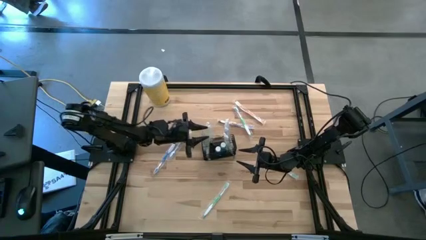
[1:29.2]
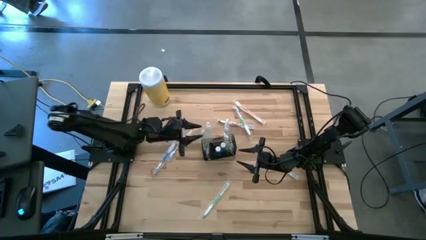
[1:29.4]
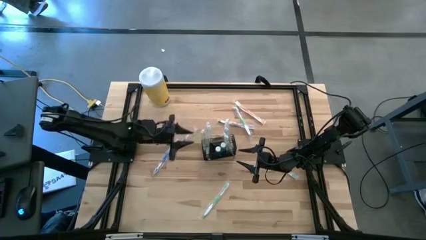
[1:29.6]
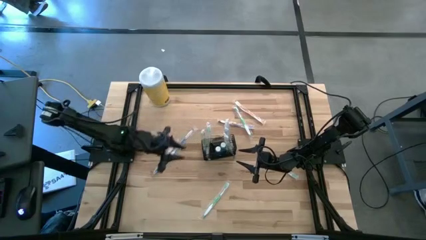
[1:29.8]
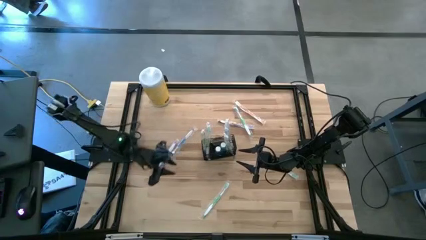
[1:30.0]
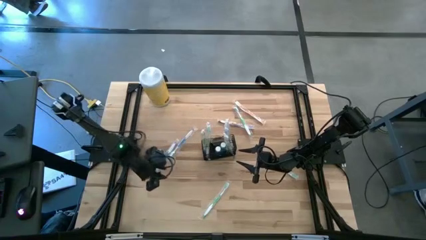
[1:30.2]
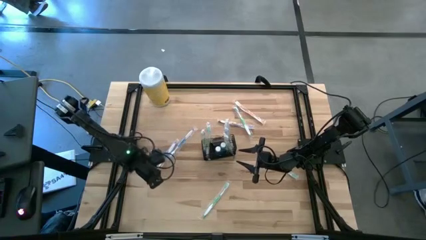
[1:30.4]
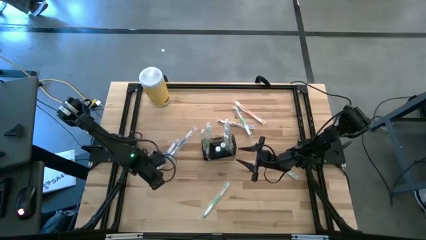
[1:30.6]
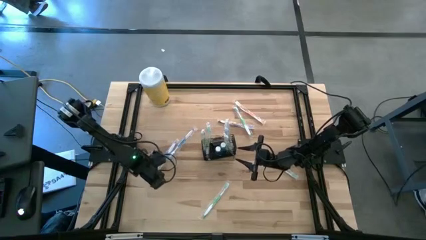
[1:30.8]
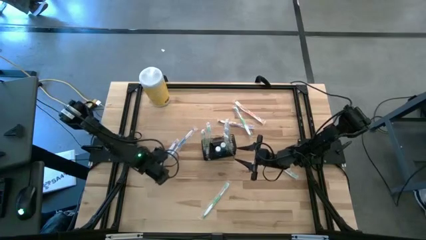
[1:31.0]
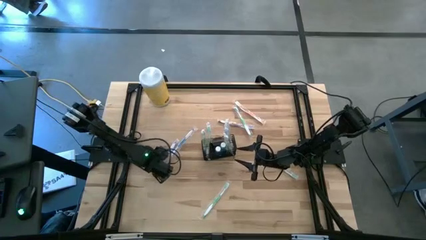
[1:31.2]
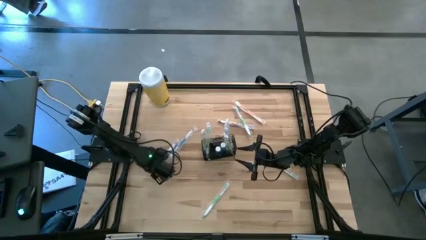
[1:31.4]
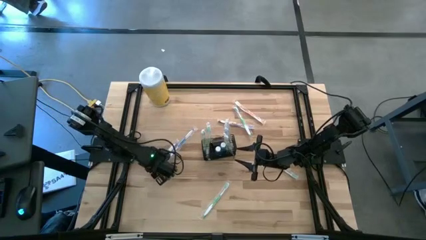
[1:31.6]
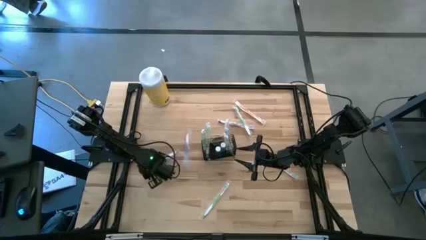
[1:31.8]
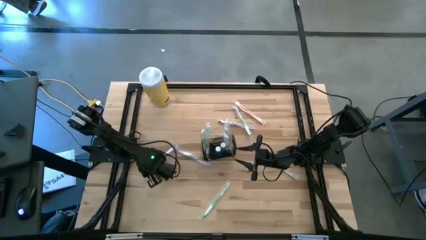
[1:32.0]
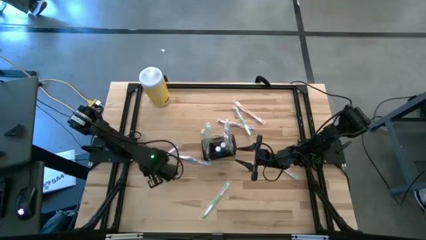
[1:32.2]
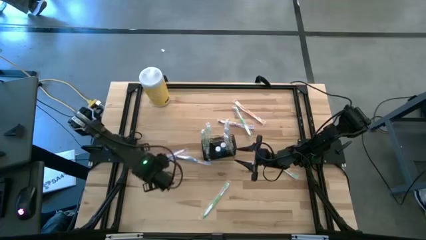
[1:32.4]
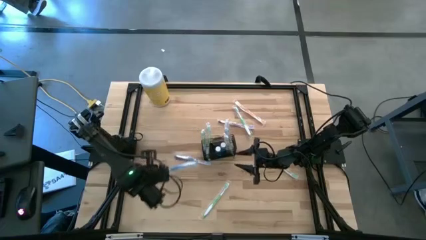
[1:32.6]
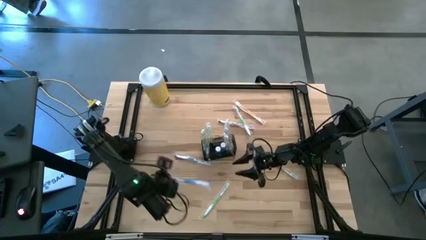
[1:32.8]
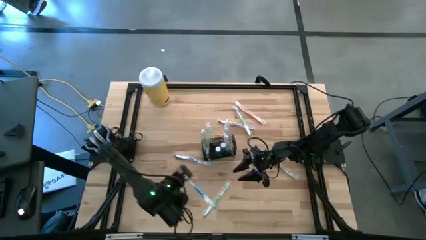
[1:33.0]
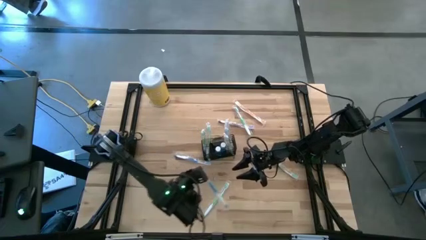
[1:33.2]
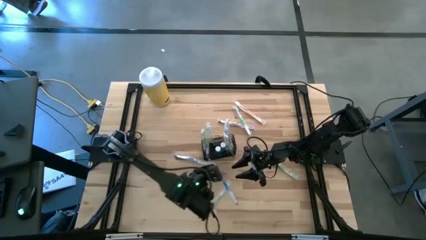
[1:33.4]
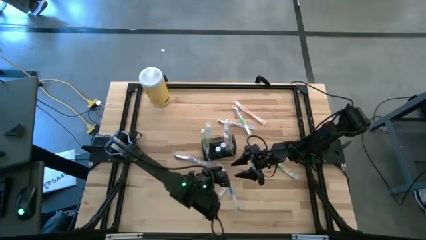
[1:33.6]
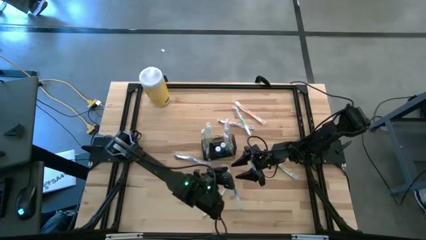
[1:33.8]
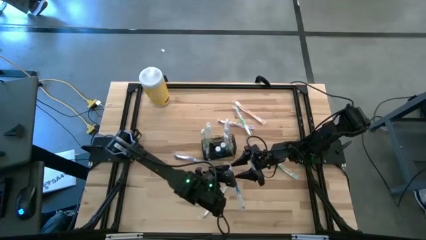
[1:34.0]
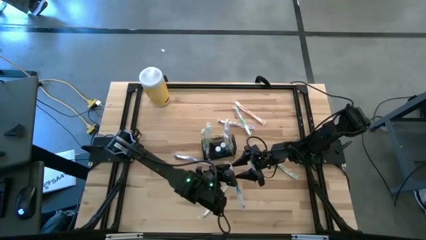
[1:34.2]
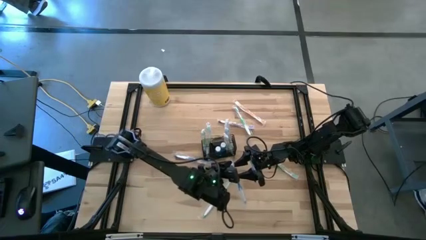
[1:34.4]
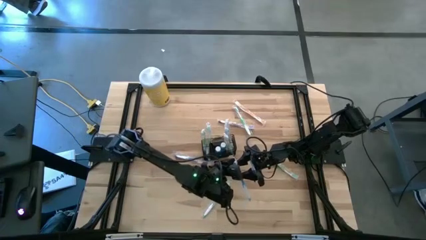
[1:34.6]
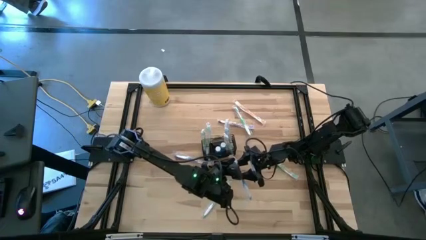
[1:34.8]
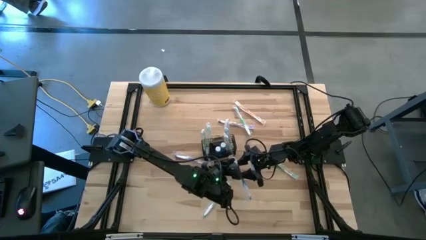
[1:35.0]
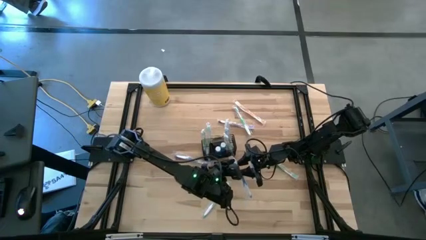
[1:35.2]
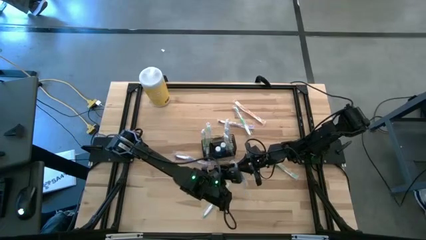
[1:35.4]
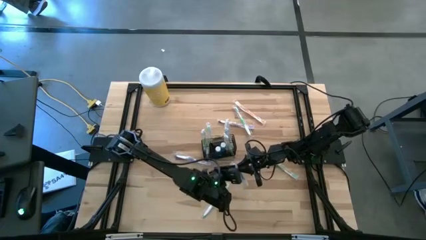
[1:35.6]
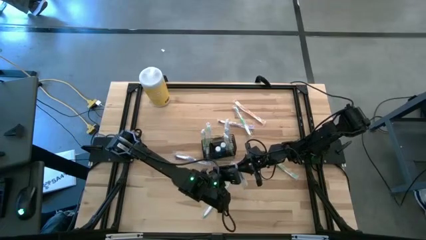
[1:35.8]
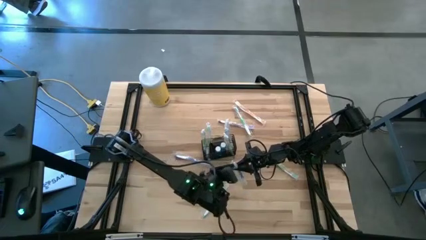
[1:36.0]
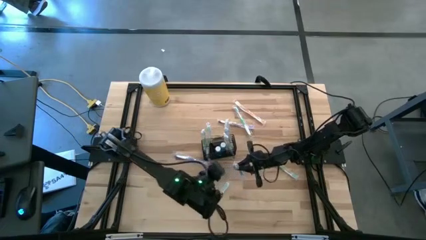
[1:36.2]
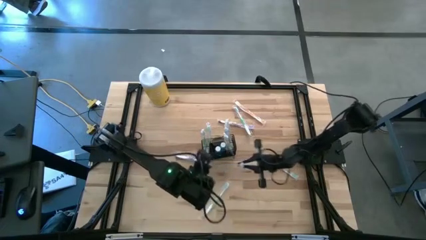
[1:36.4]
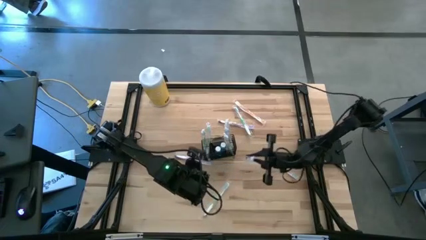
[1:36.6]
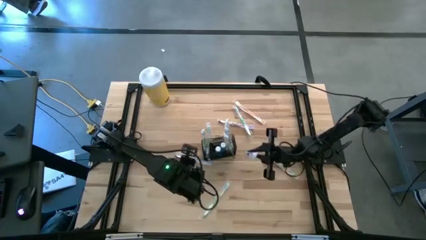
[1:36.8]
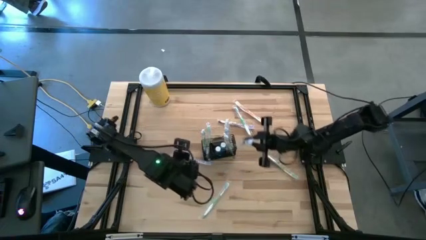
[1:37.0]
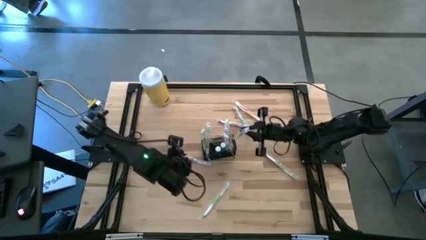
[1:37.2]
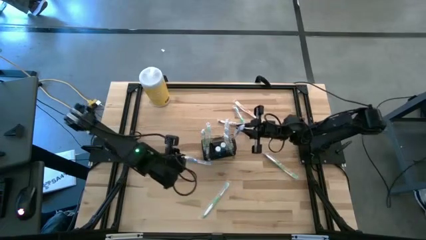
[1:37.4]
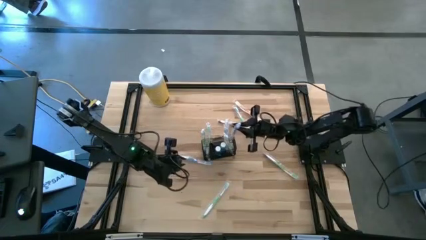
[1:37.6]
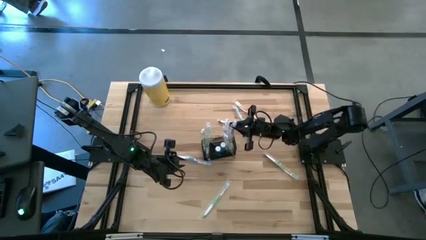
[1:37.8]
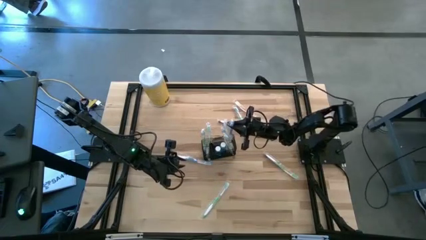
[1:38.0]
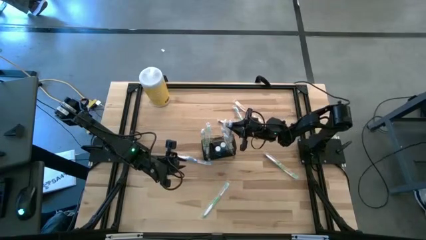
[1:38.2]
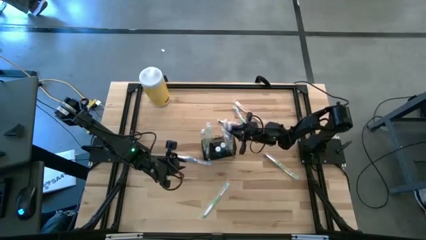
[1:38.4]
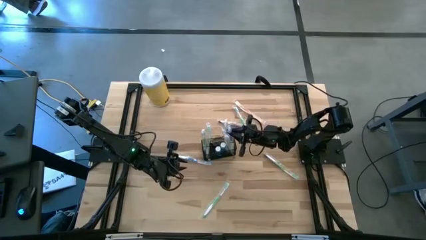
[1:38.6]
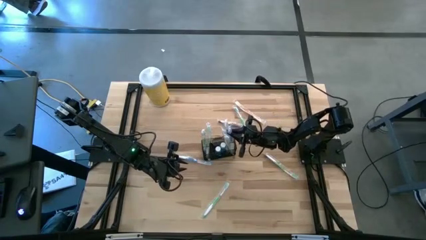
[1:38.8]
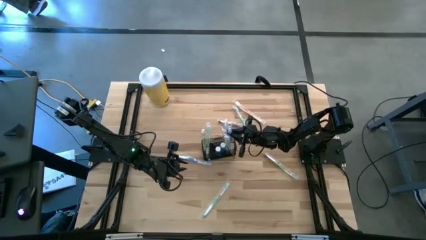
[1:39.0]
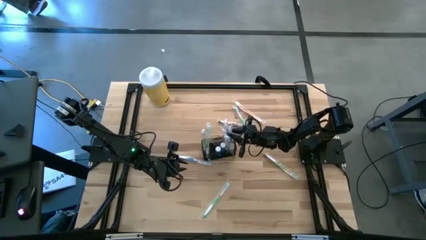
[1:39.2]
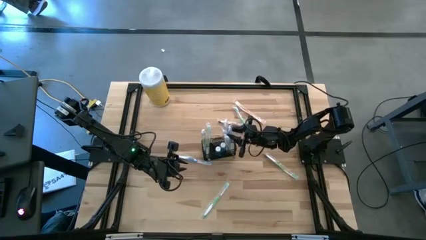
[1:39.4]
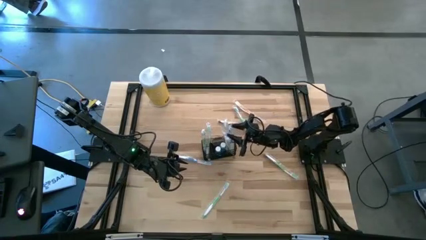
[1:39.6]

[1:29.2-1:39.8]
Task: Pick & Place toothbrushing station
Put the blue toothbrush into the wire organizer

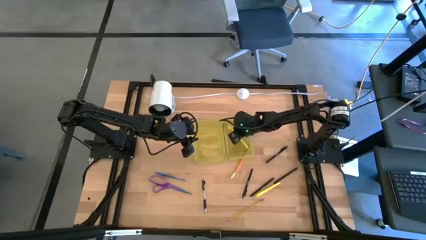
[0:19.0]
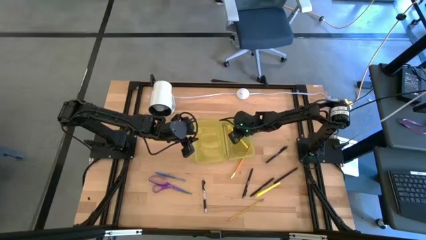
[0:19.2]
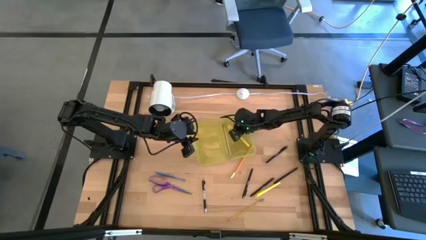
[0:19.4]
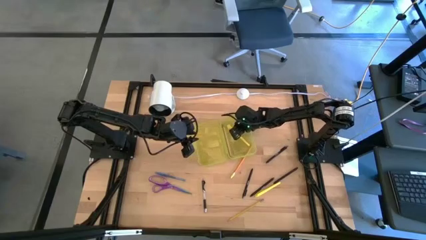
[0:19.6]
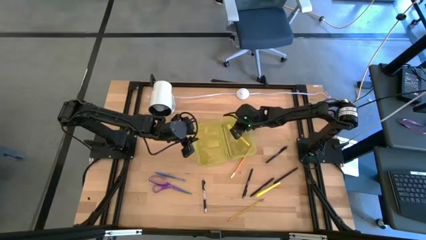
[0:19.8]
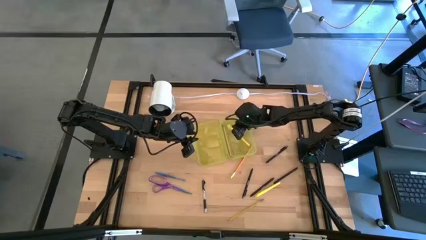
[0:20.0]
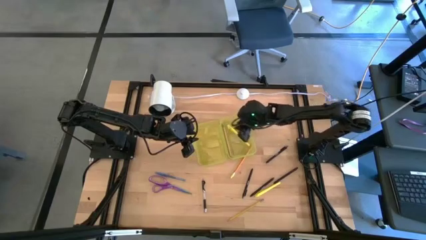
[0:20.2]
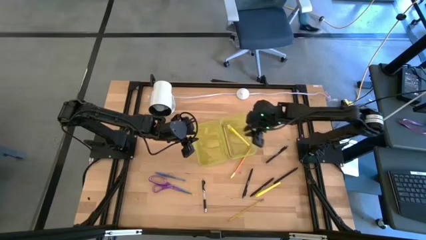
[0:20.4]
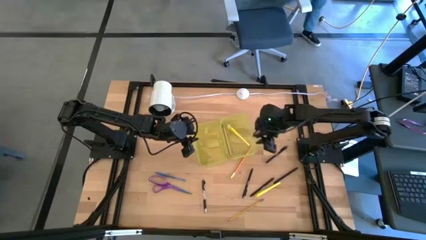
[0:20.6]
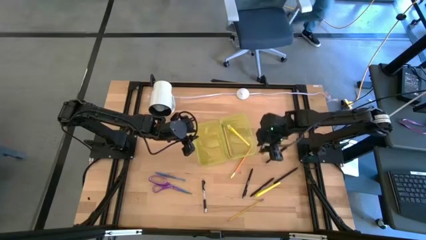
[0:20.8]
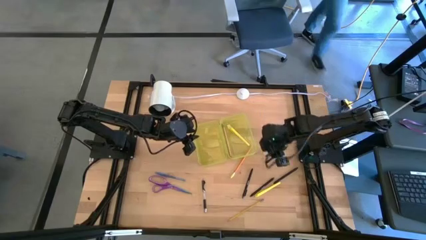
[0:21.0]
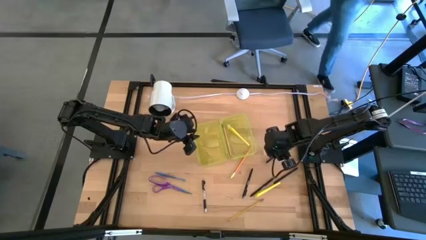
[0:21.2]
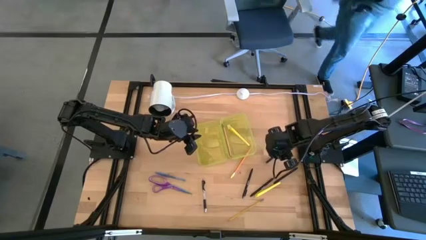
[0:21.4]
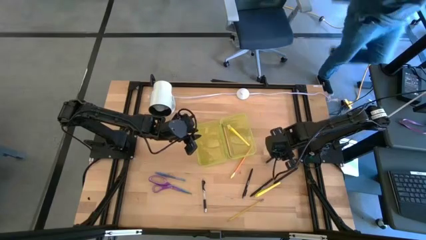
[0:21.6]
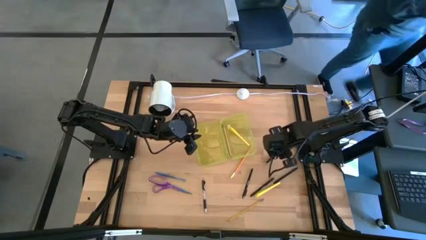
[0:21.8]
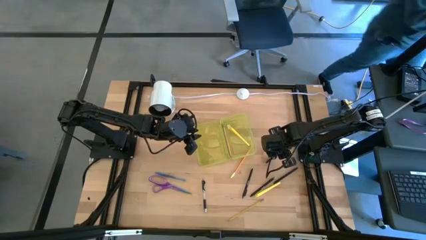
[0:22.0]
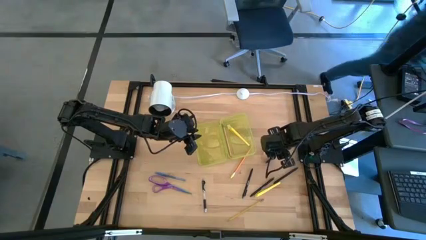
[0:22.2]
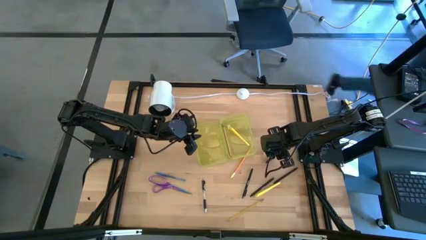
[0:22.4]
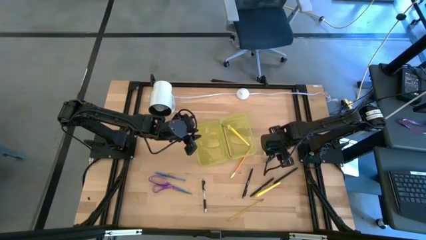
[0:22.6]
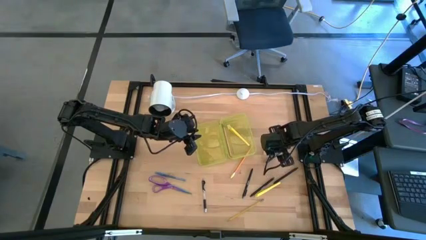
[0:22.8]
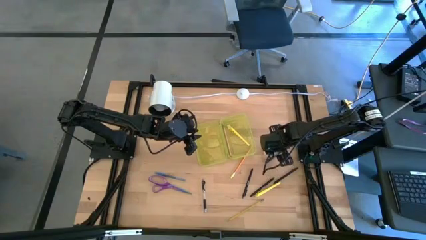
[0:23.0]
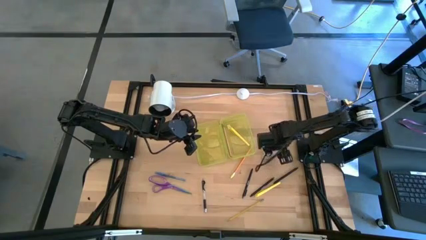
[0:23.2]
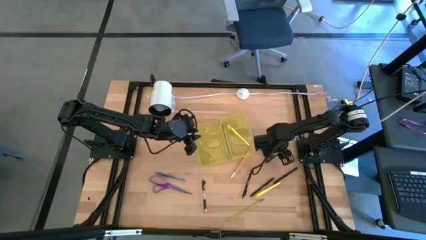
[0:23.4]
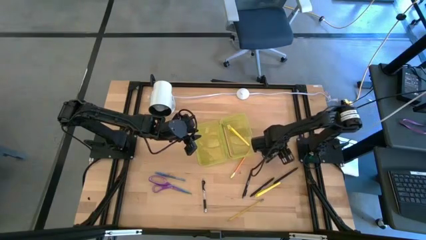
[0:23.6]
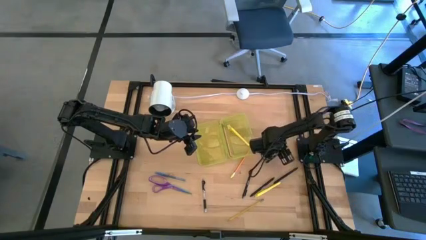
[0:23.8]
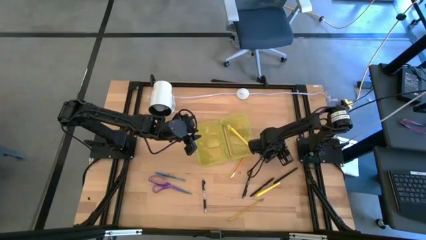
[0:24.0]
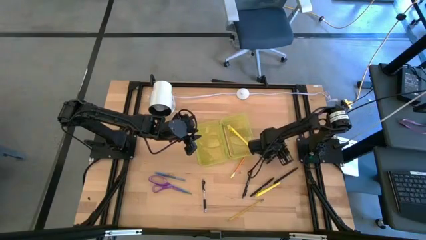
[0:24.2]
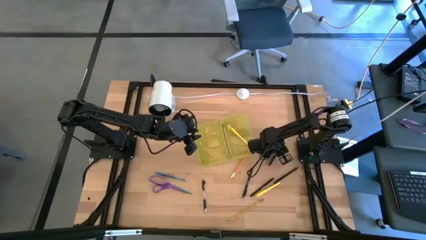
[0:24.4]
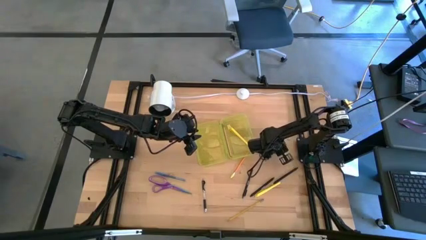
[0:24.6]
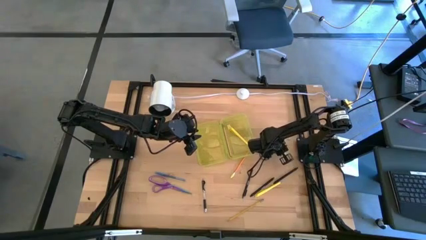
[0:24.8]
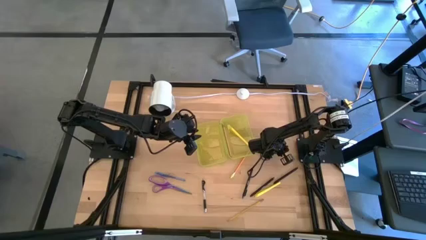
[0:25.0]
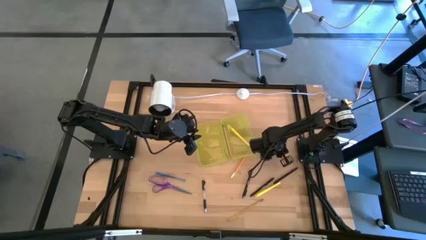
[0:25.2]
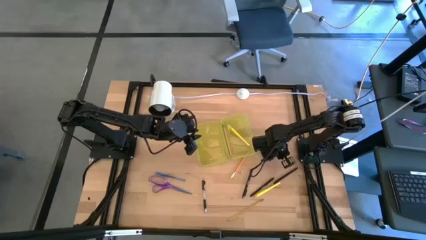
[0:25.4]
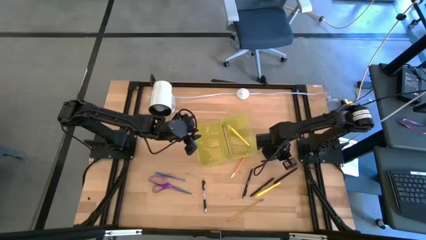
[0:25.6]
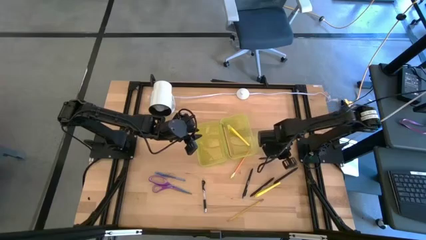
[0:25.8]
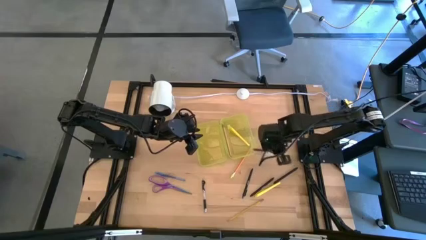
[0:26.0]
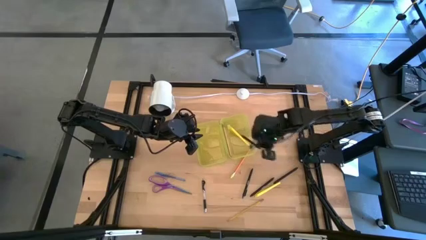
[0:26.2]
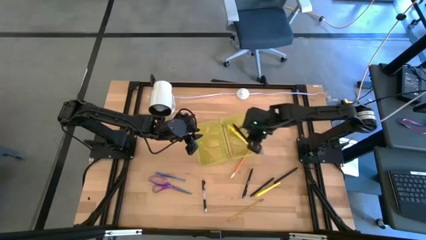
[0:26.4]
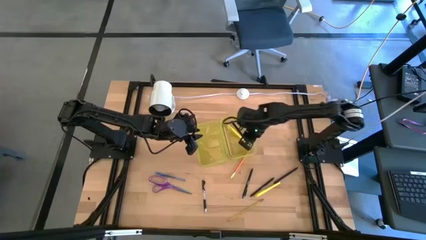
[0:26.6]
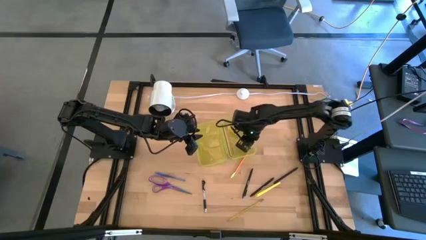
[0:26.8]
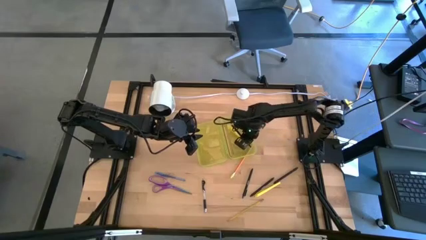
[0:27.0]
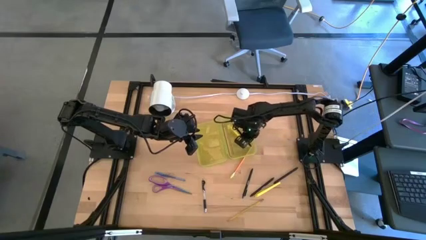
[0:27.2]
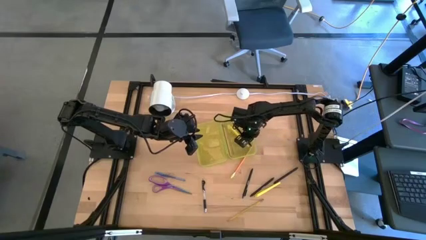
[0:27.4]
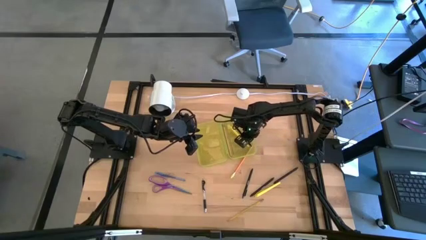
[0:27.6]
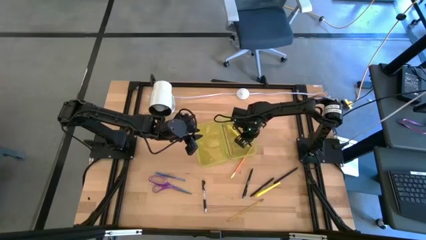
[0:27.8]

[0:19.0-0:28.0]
Task: Pick & place school supplies into a supply box
Put the black pen into the yellow supply box
